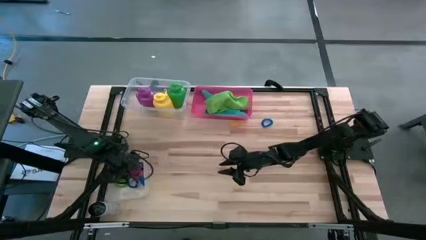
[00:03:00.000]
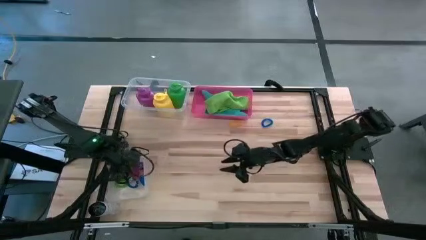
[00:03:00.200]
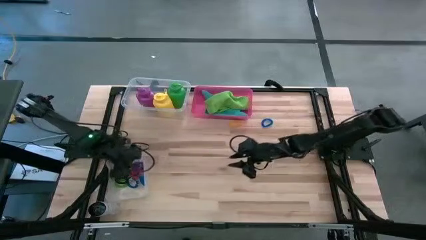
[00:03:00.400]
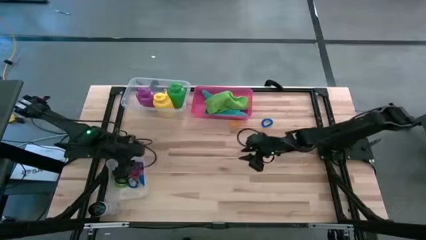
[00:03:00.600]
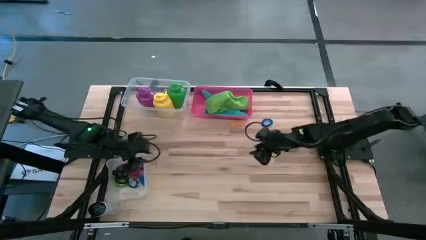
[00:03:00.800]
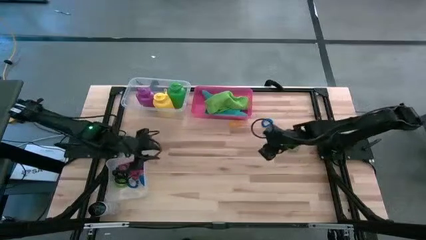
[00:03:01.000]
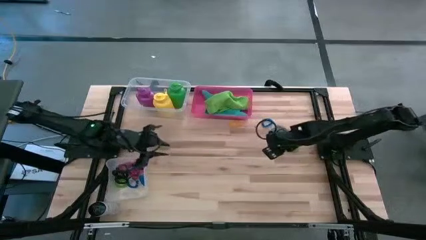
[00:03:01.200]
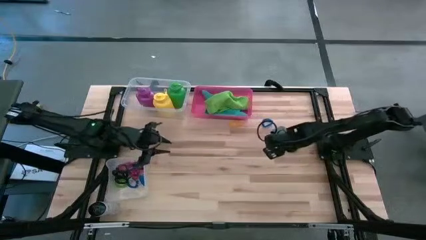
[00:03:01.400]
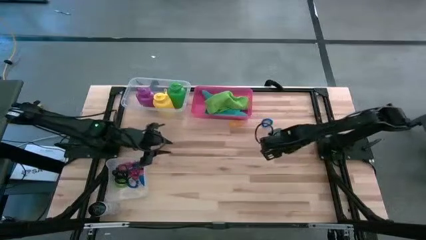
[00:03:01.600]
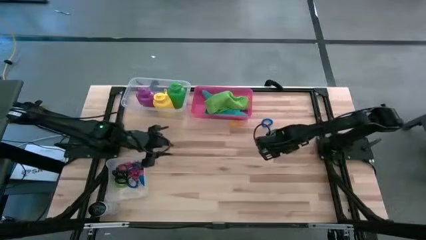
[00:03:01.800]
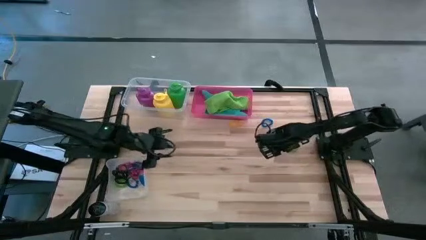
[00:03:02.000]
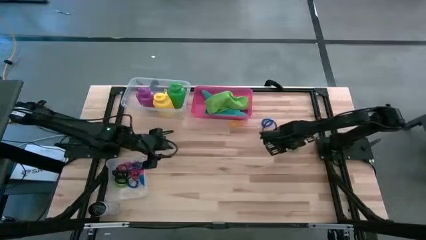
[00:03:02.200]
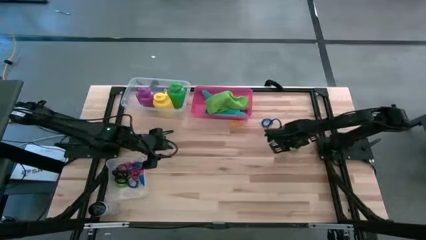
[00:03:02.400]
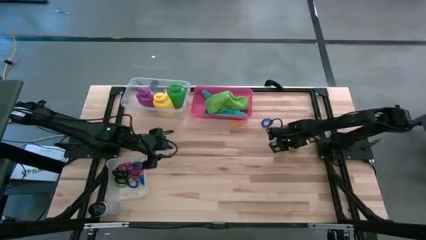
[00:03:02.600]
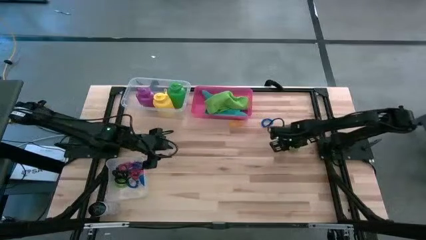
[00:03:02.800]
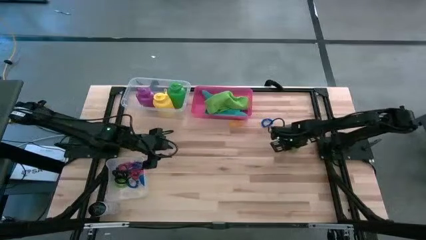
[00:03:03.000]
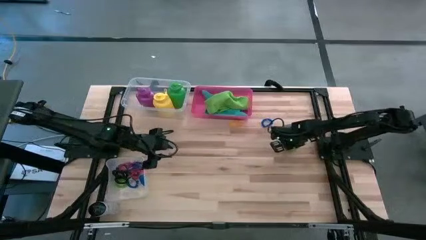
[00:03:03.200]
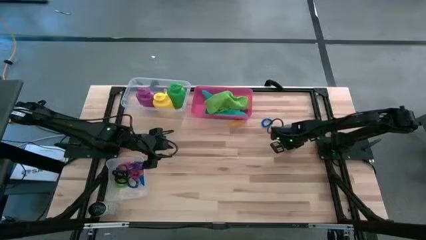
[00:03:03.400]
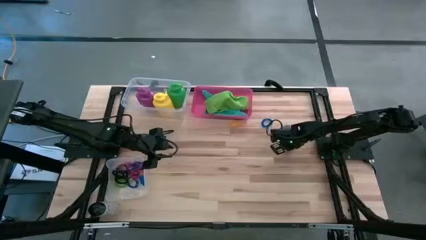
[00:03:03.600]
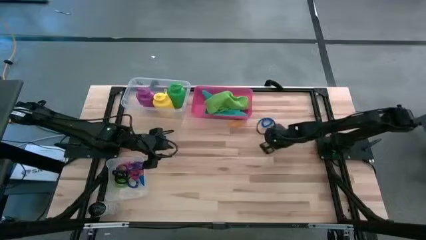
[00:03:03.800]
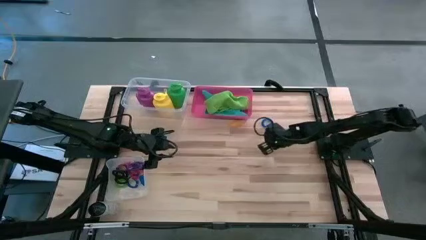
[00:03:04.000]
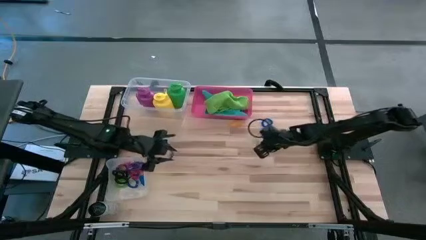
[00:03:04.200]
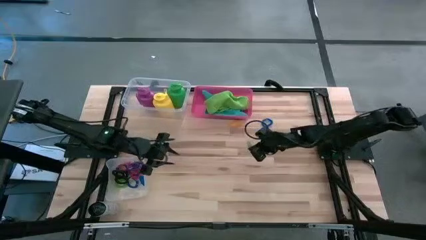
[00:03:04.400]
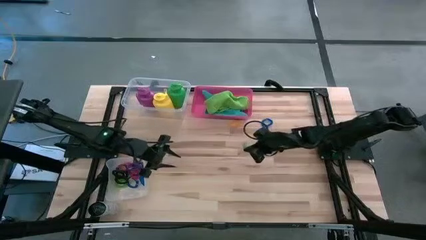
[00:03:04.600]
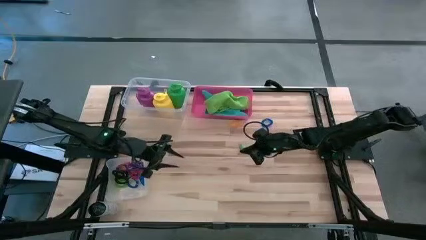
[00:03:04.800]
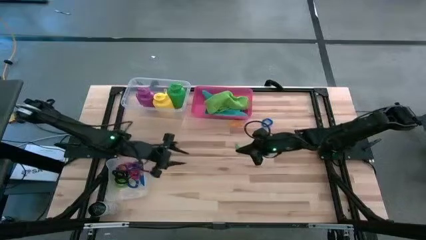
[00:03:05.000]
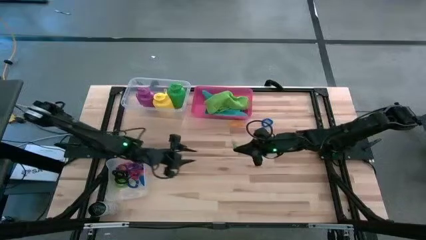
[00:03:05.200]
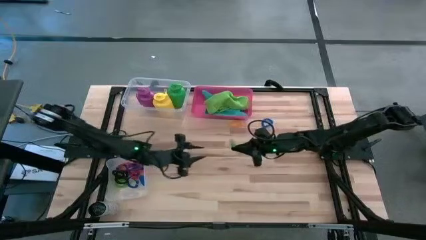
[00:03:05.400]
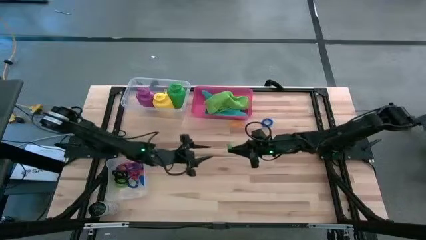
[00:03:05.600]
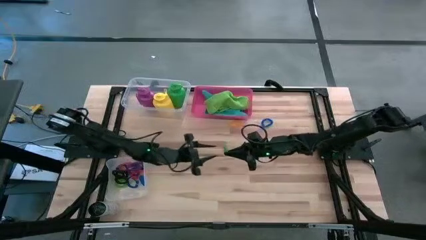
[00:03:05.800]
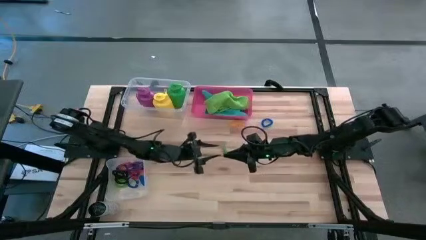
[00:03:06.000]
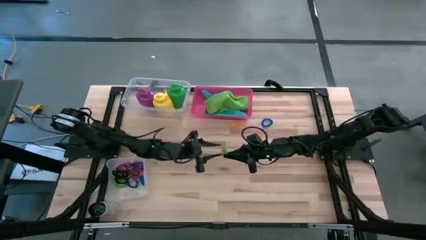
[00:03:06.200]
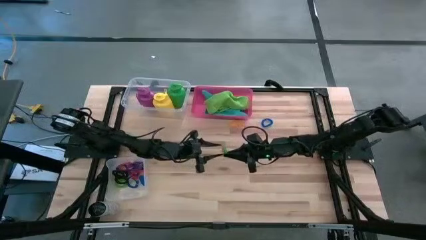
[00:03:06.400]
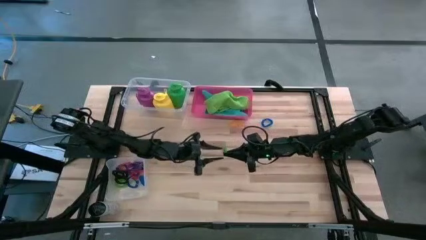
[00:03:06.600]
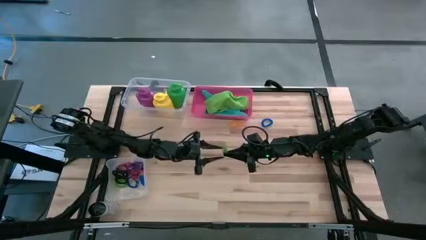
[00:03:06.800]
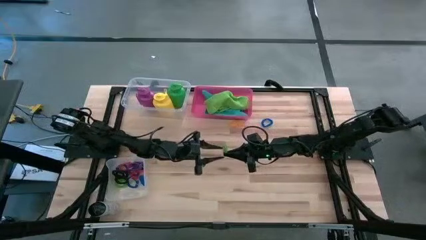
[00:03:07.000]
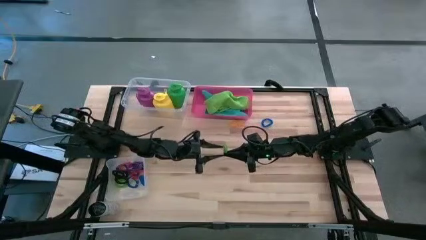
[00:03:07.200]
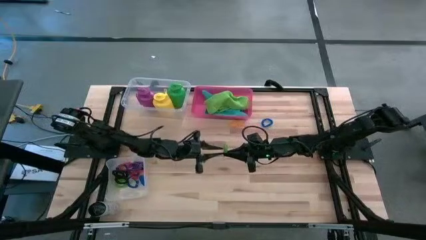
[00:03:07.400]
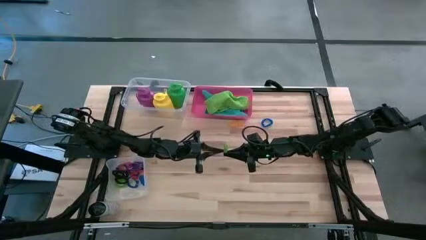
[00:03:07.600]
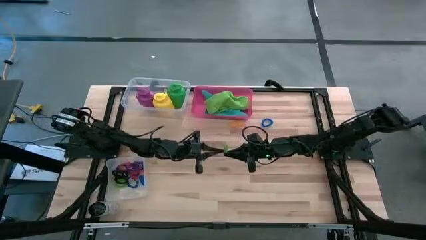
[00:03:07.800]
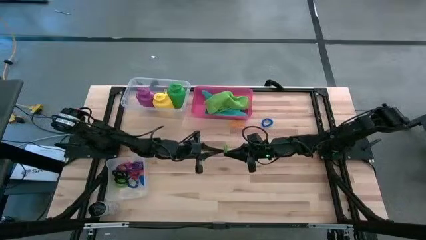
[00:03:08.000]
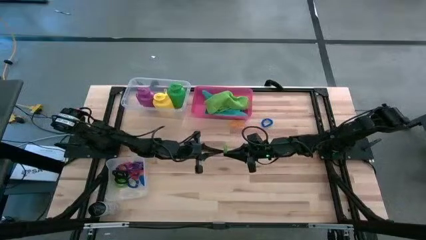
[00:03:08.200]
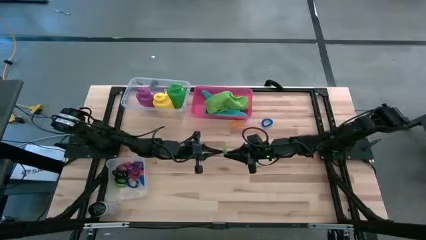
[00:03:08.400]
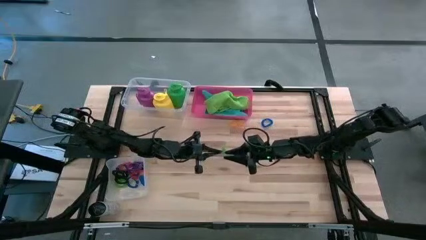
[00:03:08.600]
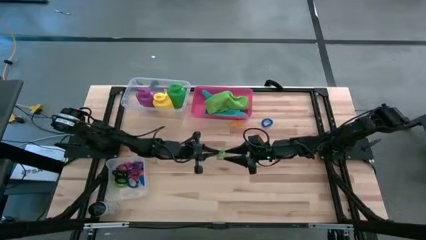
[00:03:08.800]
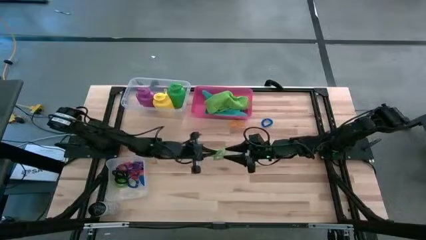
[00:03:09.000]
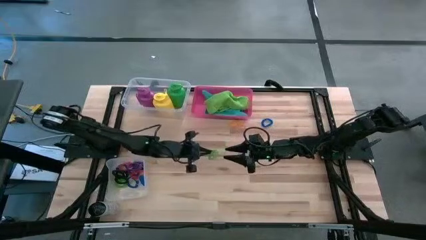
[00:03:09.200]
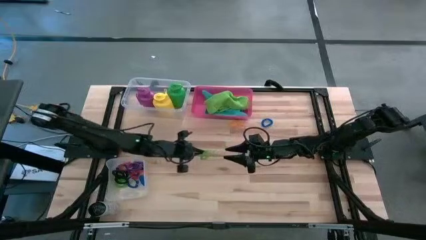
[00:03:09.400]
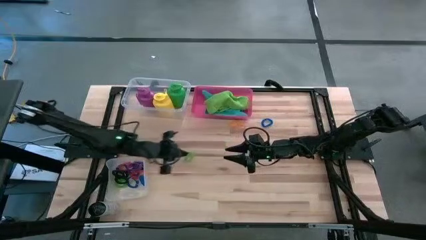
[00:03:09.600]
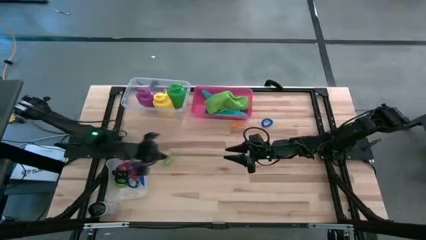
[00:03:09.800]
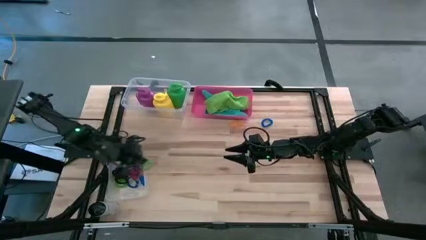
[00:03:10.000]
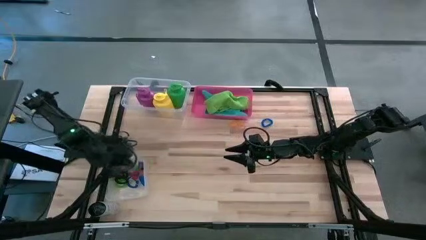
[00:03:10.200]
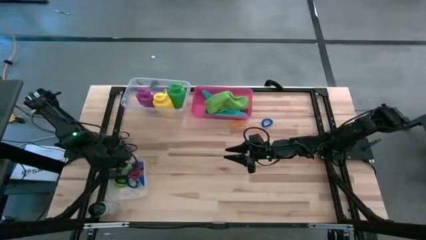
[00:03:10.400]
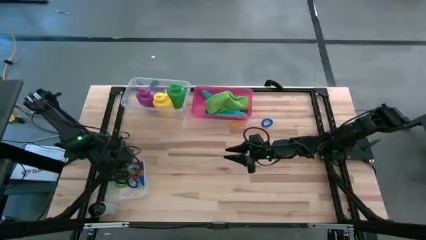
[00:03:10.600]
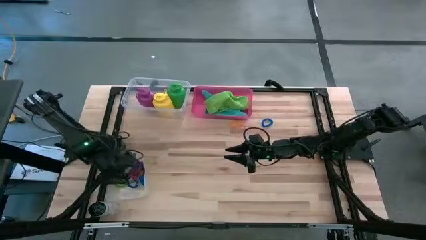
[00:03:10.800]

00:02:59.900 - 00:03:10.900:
Task: Pick & Place Sports Items
Put the green spring keychain into the bottom transparent bin

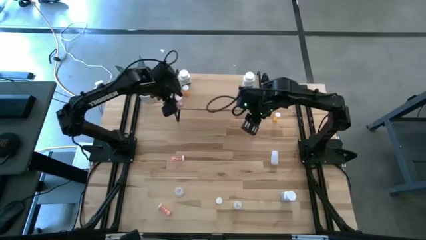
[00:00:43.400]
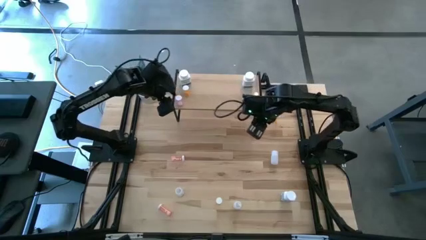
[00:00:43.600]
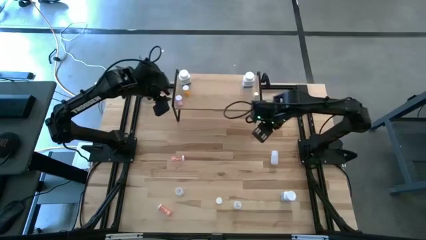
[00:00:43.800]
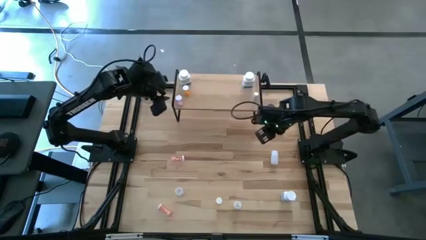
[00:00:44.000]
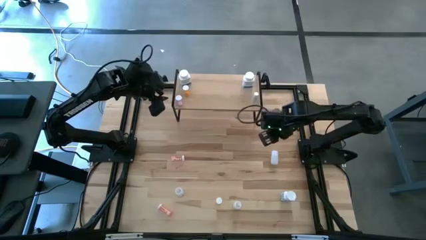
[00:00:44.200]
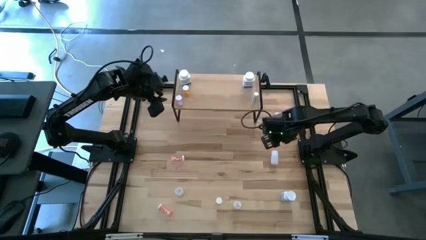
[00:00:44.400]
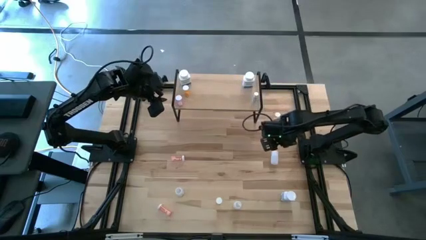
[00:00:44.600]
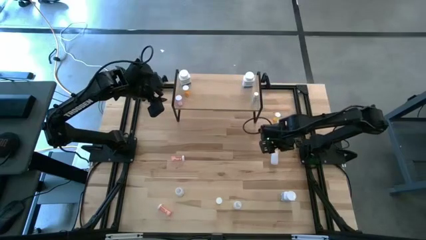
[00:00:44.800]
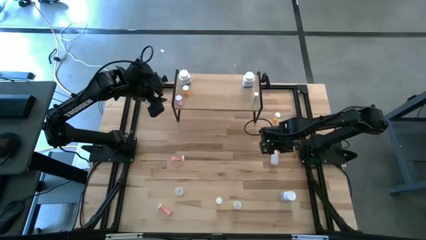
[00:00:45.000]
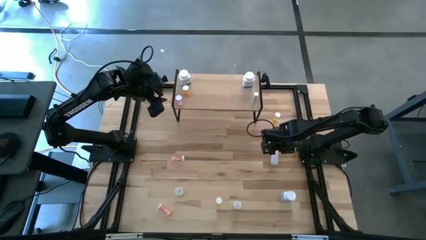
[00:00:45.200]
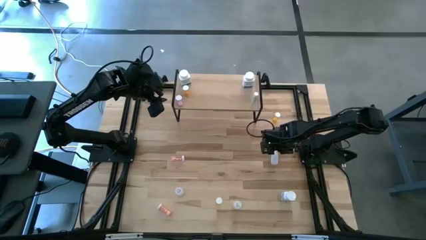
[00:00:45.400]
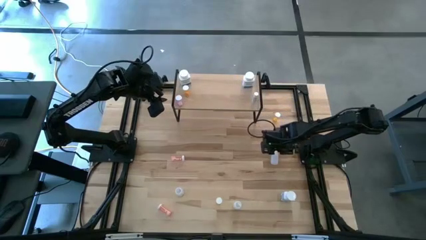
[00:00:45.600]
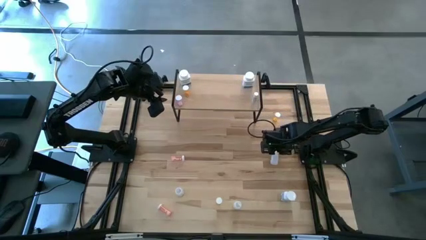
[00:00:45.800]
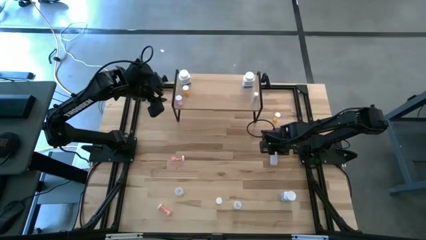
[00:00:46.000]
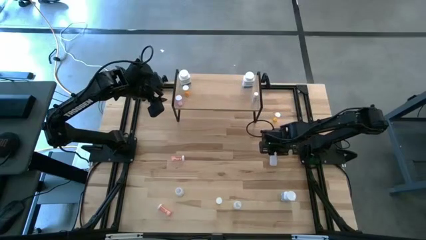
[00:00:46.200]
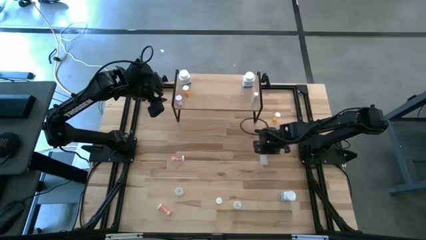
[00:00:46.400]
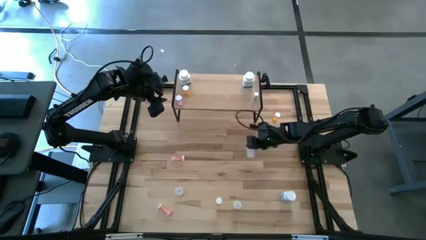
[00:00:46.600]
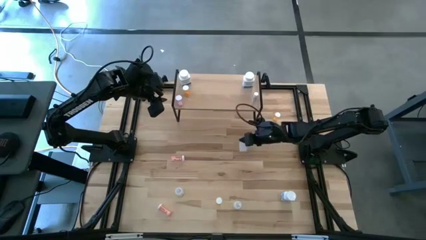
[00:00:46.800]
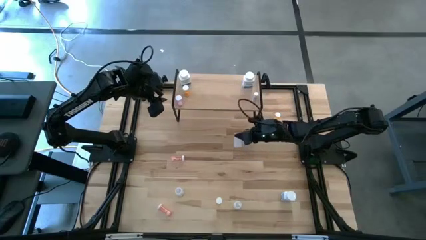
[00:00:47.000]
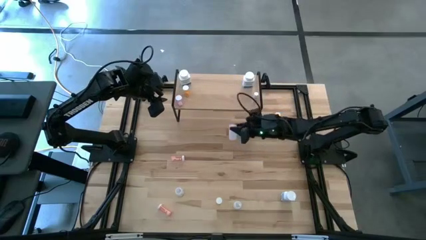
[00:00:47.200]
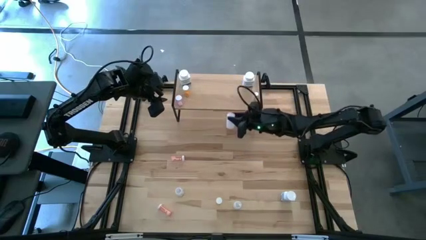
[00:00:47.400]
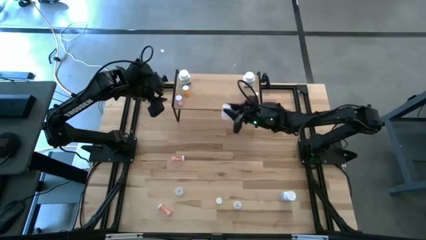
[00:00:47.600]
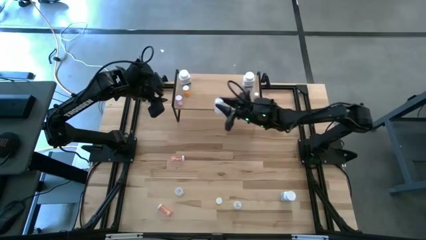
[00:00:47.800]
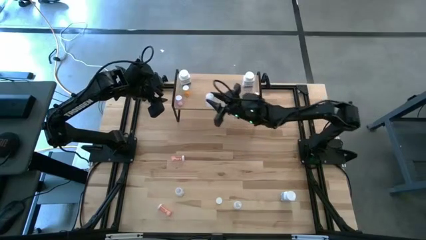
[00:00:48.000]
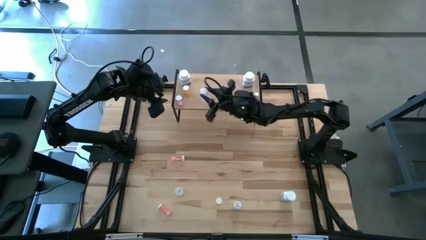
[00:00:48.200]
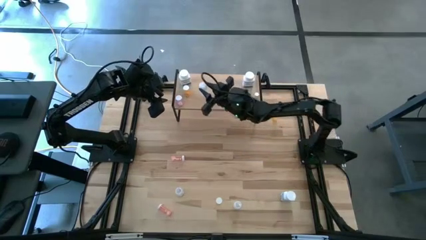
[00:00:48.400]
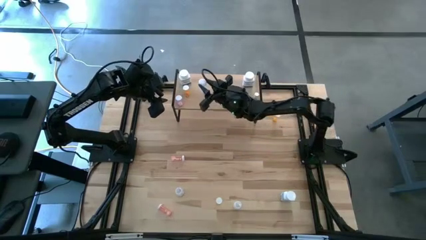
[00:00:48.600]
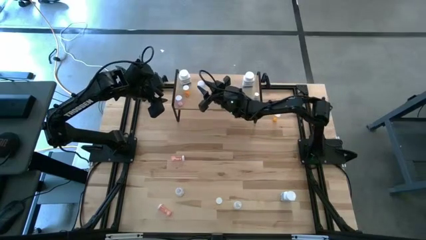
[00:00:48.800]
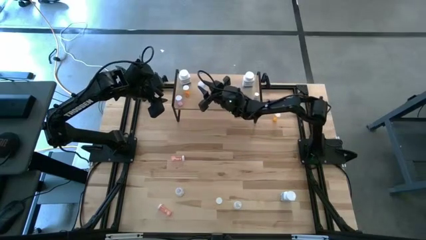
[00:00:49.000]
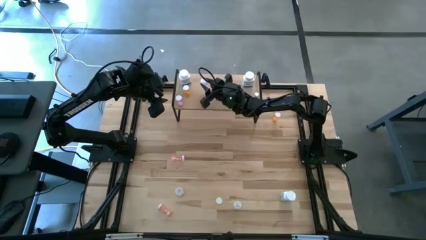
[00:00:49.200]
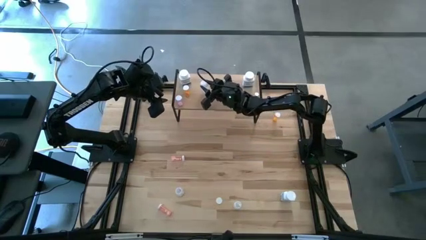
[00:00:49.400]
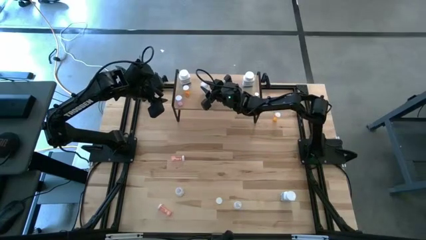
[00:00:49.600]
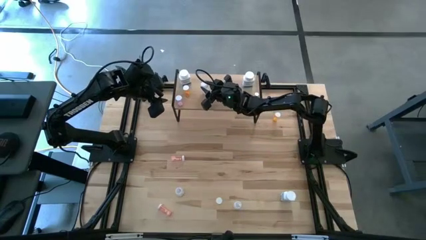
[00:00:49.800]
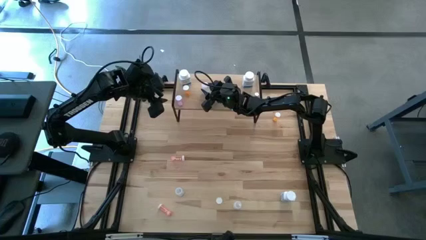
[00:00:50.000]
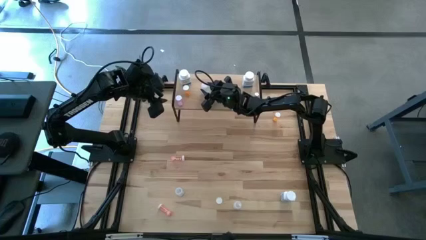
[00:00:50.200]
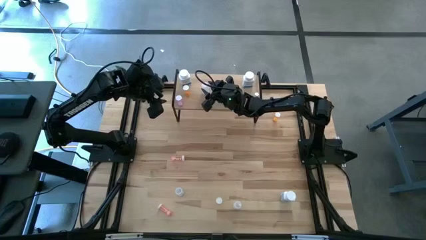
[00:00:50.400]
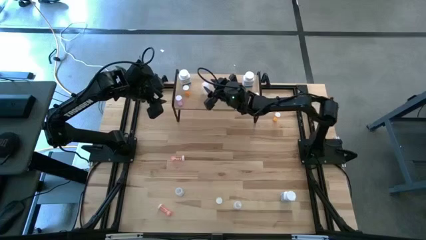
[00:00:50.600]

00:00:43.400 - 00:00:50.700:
Task: Pick and place medicine bottles onto shelf by color
Put the top white pill bottle on the shelf
